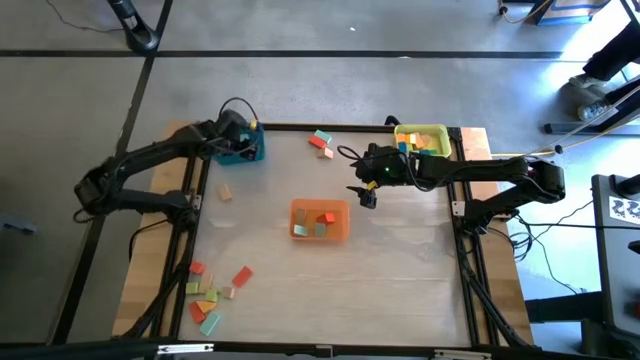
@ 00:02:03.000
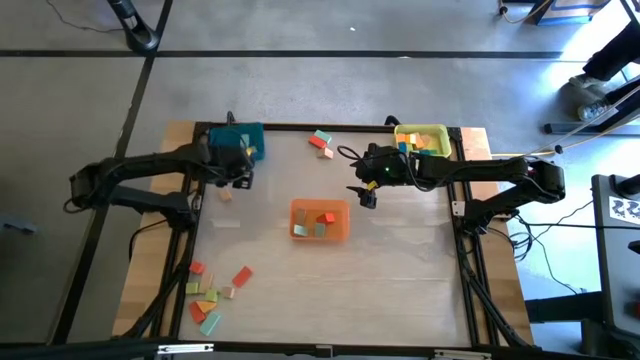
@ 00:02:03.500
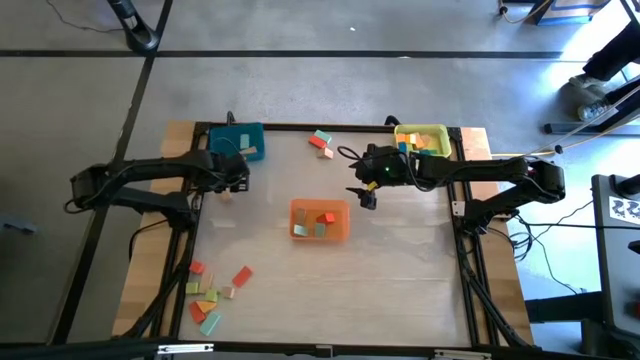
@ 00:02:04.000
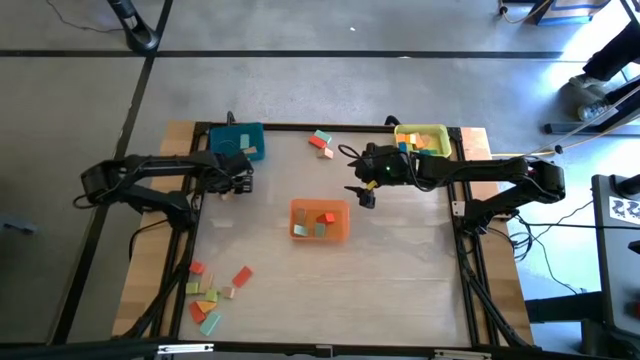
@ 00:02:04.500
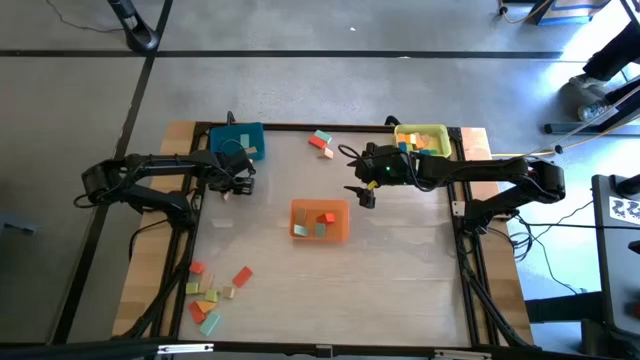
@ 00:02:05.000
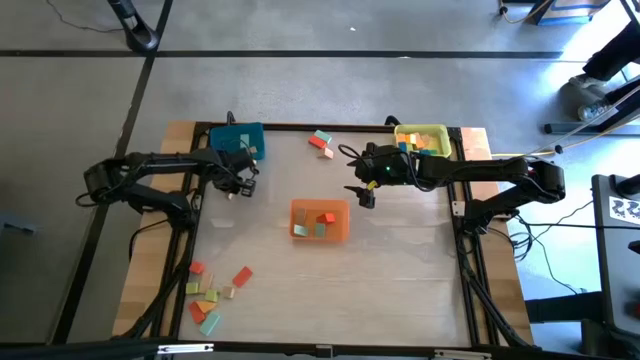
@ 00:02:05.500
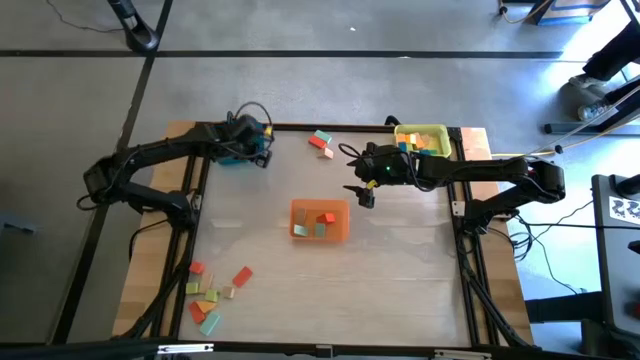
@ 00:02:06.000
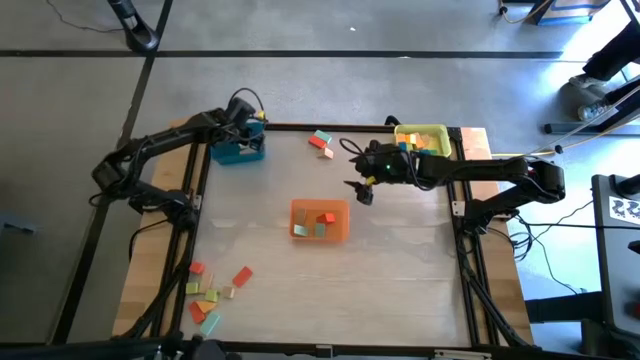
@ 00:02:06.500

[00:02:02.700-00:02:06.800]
Task: Sort blocks by size
Put the brown rectangular block into the blue bin

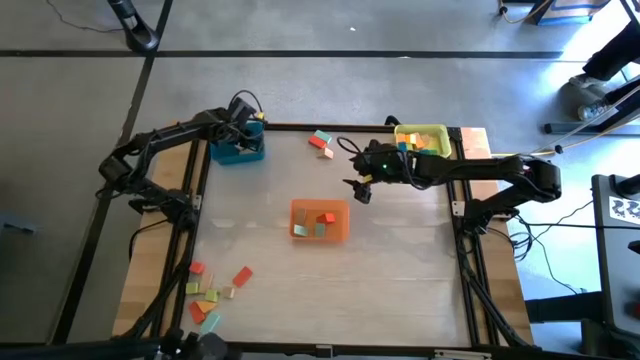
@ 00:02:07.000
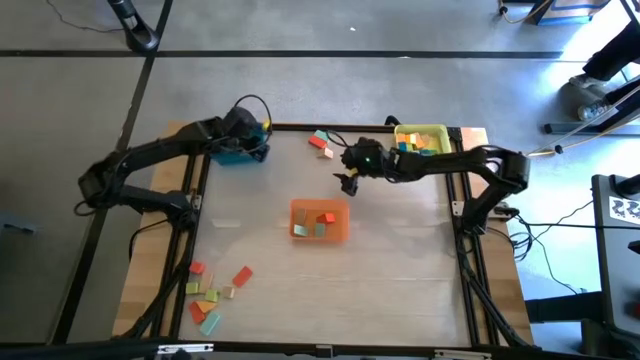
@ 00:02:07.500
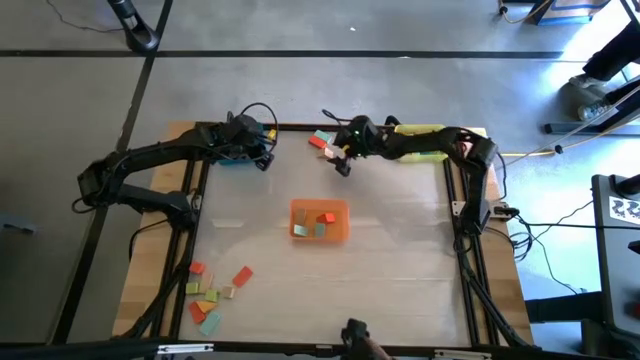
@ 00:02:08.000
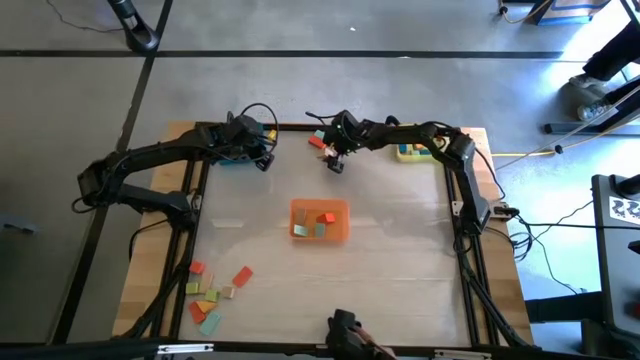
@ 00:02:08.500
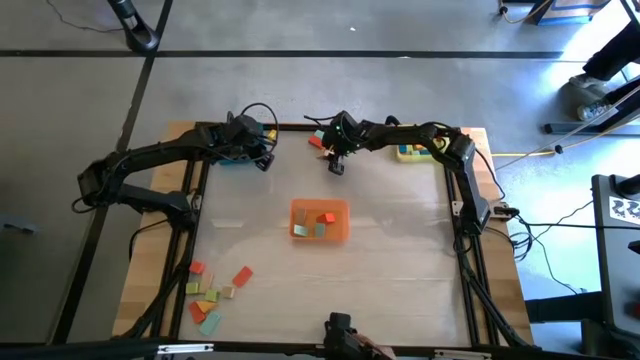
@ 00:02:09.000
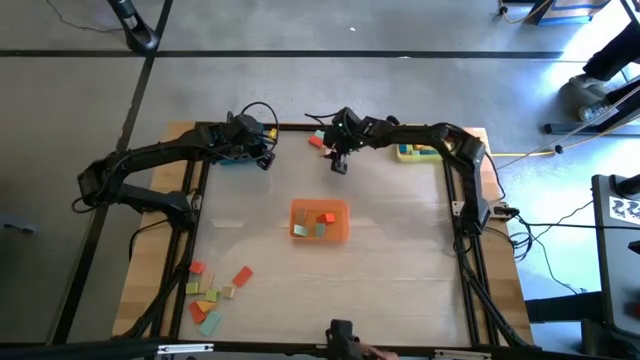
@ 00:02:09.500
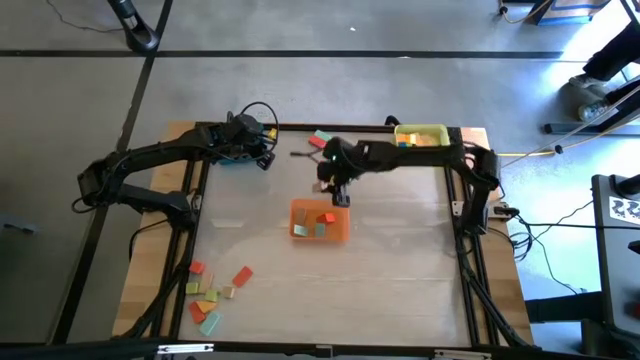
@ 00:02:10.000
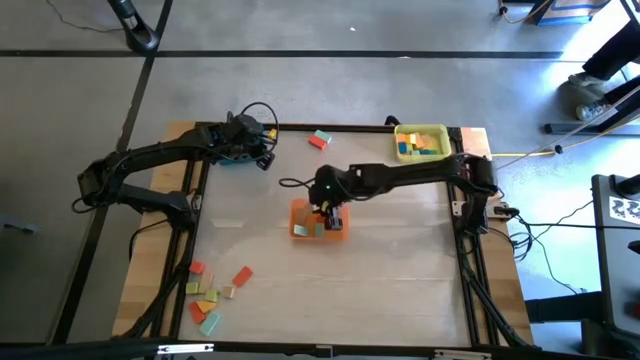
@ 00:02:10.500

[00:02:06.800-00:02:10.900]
Put the brown triangular block into the orange bin

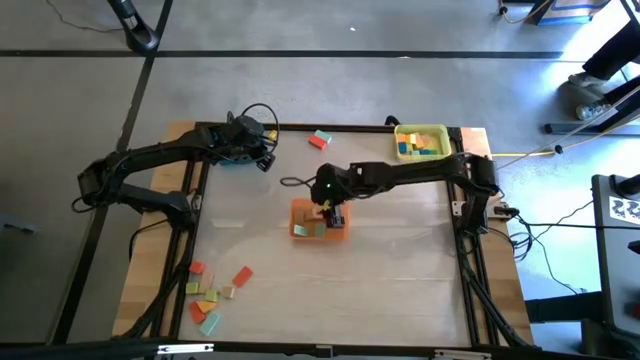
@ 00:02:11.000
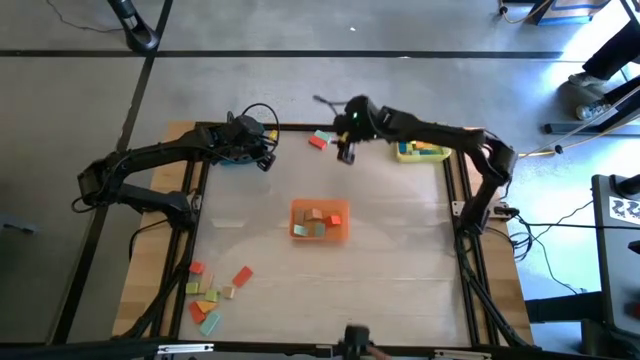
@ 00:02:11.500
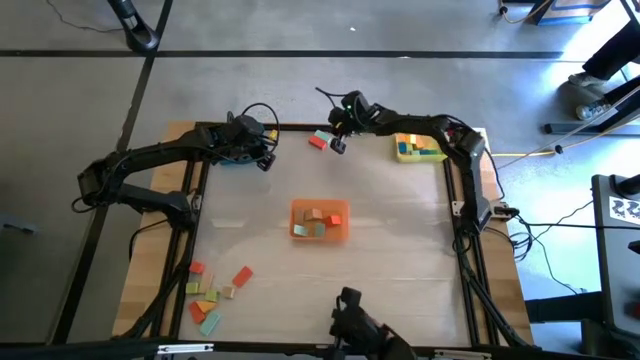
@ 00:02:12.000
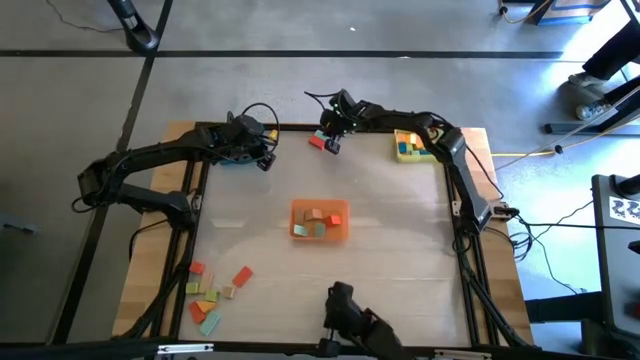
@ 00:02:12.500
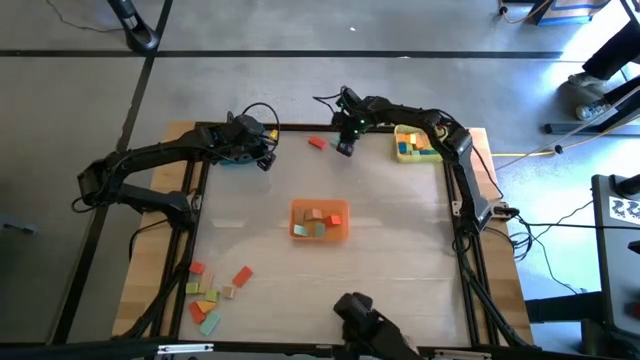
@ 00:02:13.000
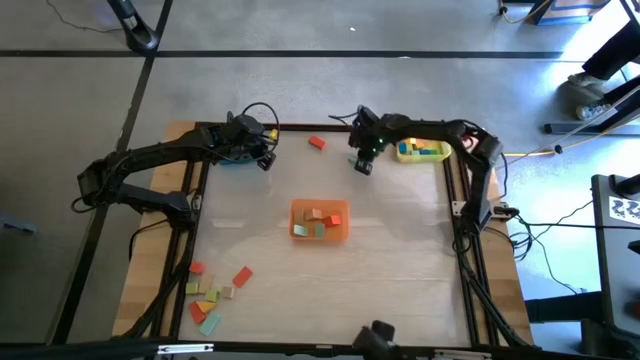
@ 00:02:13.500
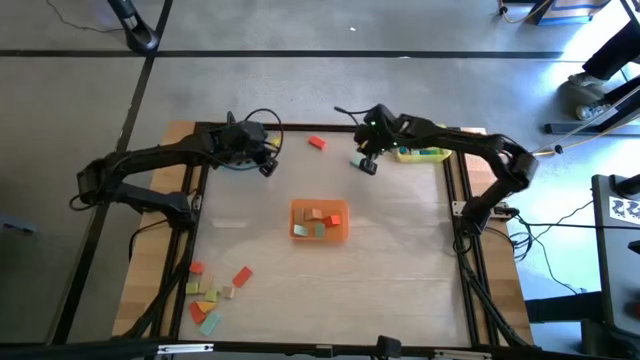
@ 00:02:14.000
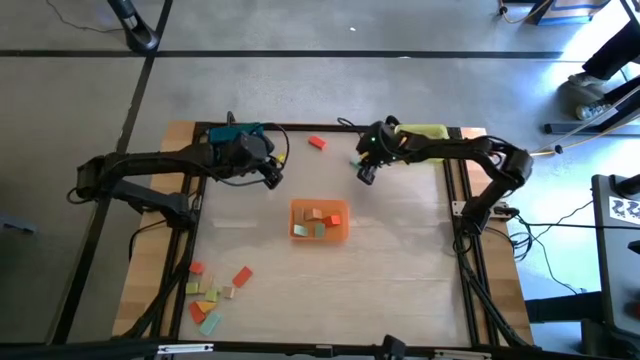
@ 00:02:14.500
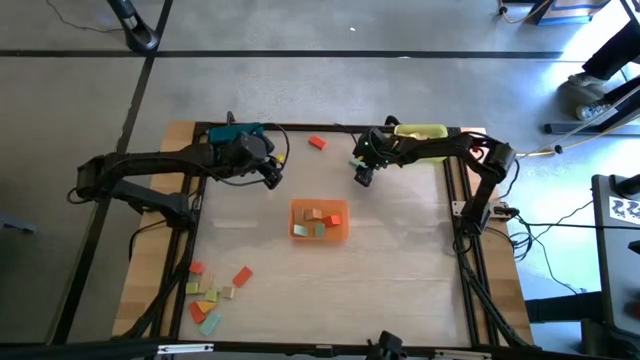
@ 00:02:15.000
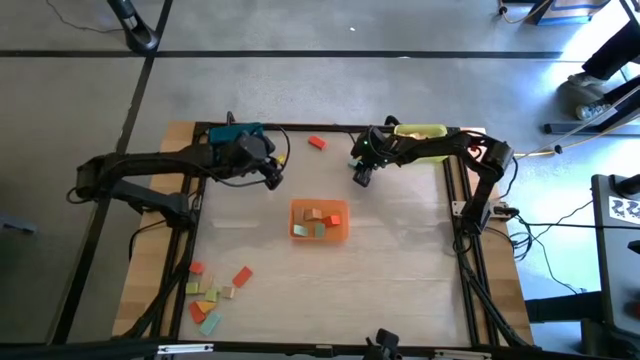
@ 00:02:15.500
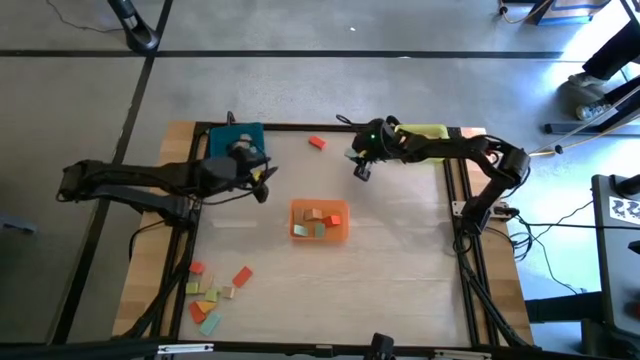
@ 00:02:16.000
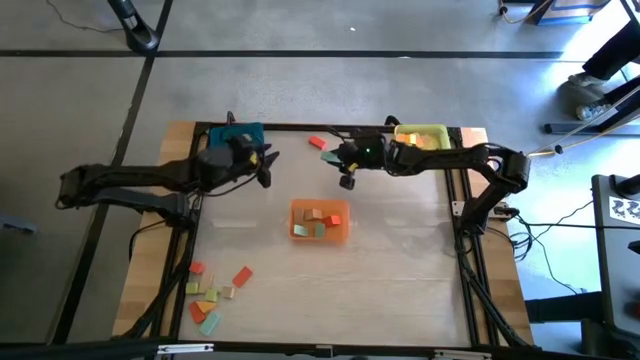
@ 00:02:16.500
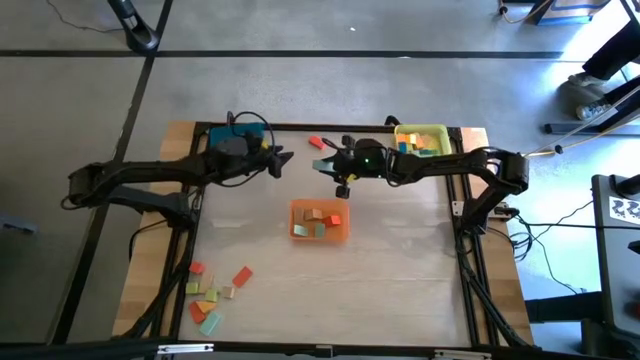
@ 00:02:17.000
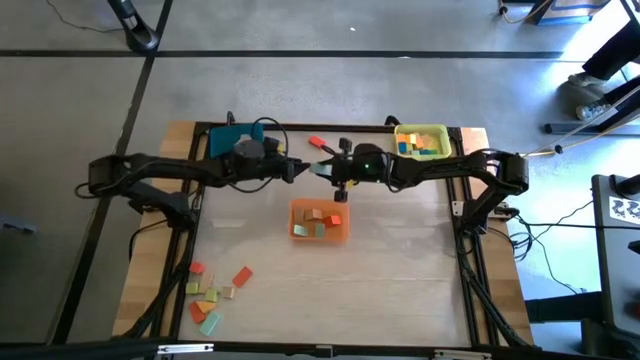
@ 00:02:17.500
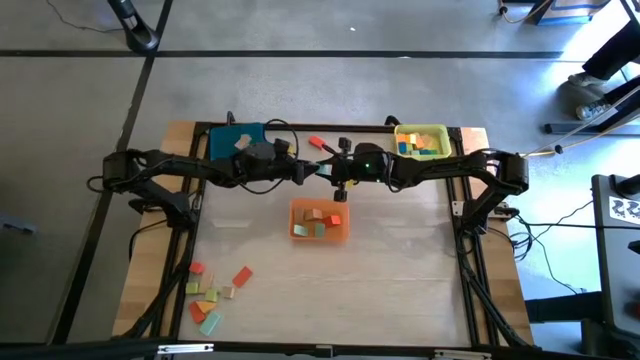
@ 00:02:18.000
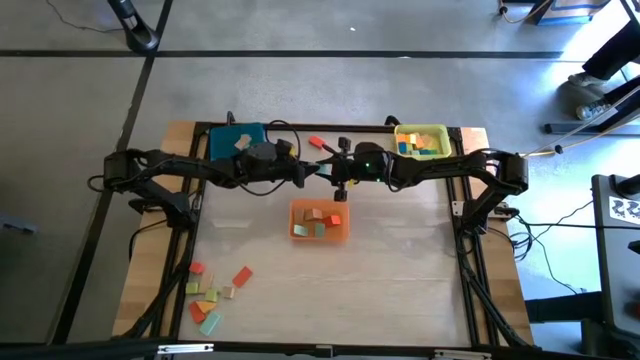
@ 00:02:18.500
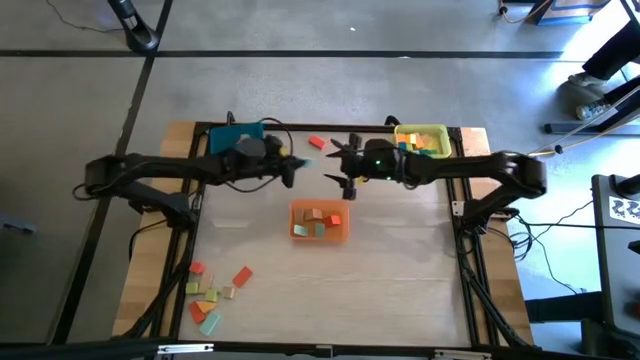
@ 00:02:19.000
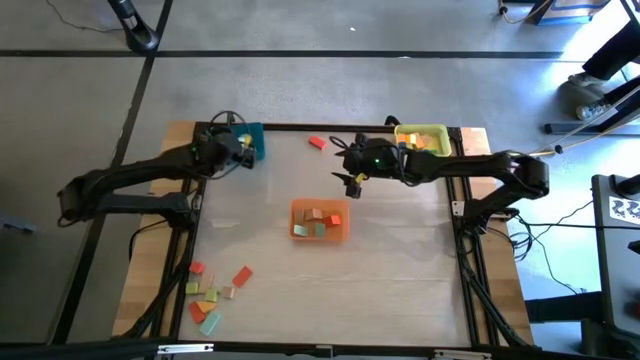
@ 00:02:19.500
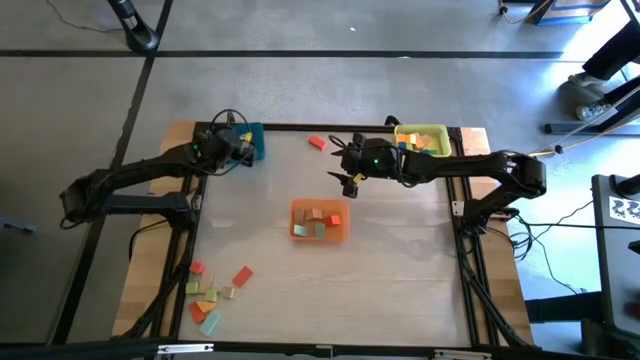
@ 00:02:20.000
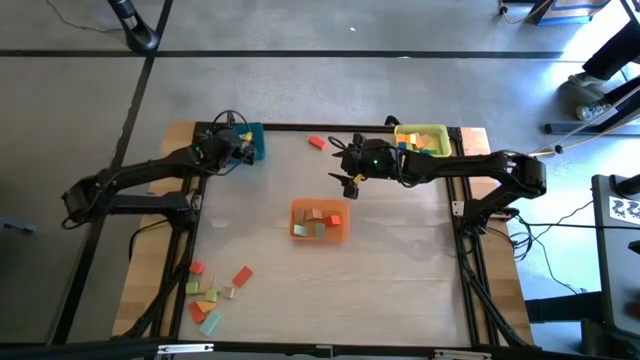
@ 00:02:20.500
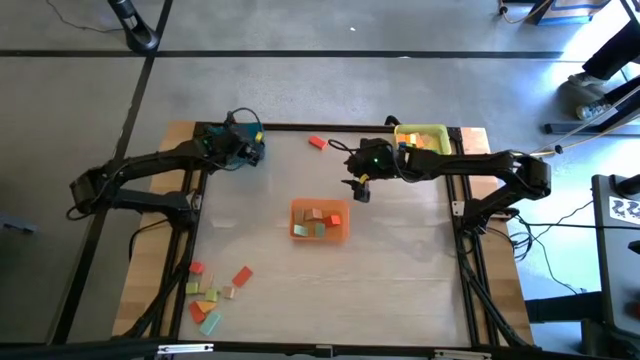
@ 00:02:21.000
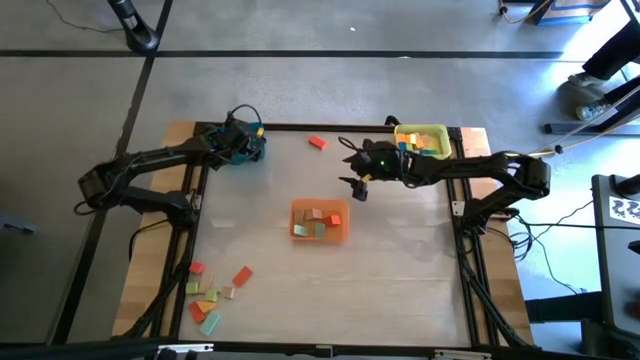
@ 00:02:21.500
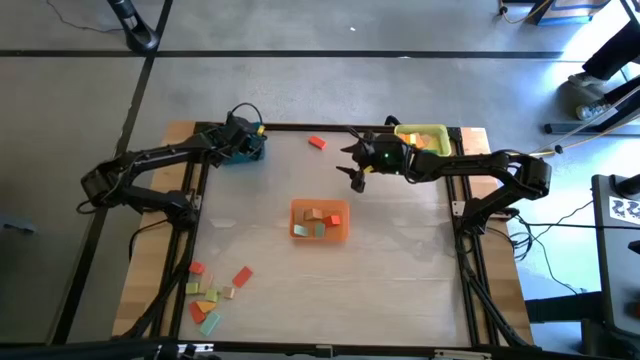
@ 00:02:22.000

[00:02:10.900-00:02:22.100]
Put the blue rectangular block into the blue bin
